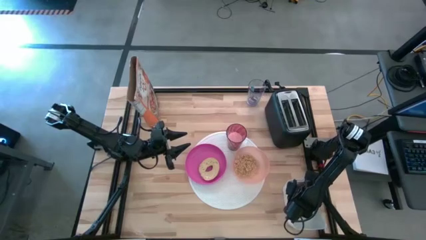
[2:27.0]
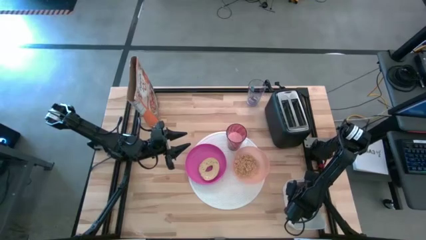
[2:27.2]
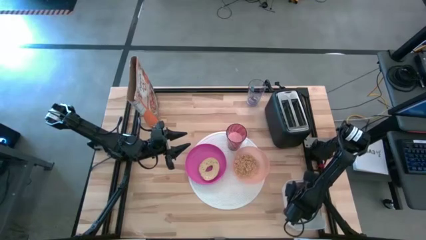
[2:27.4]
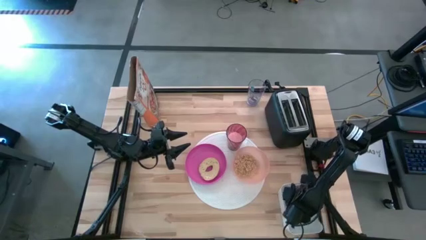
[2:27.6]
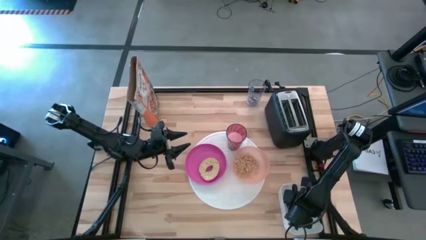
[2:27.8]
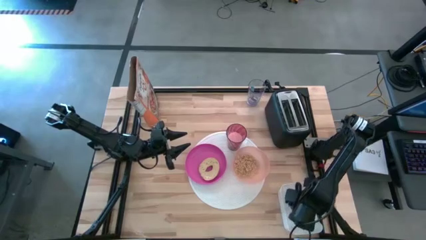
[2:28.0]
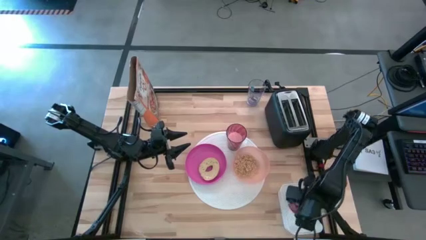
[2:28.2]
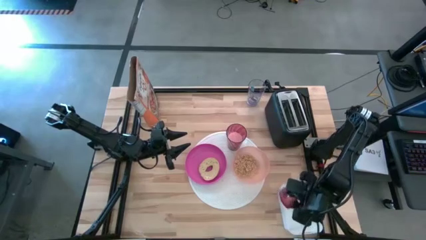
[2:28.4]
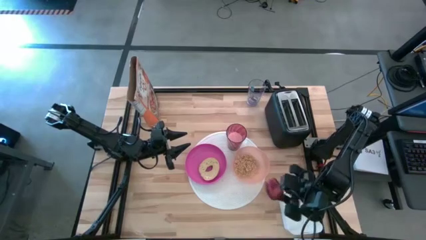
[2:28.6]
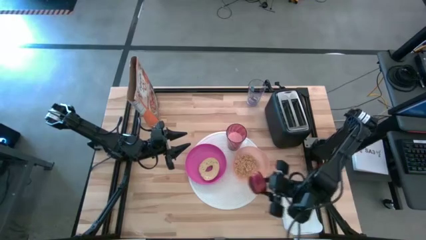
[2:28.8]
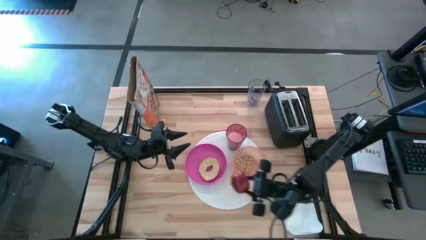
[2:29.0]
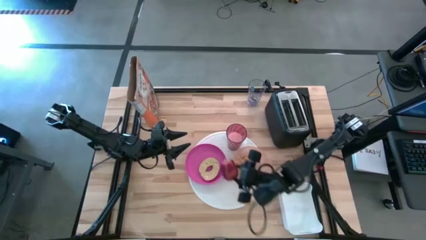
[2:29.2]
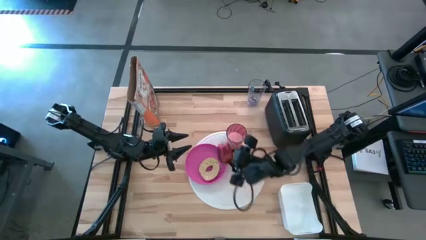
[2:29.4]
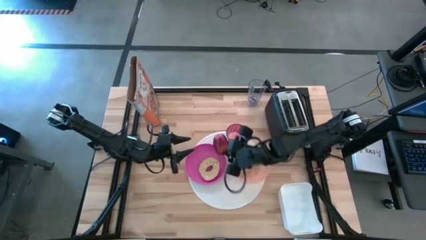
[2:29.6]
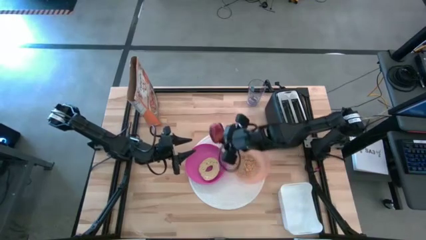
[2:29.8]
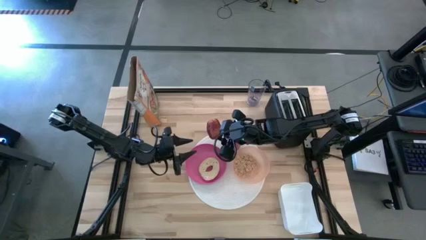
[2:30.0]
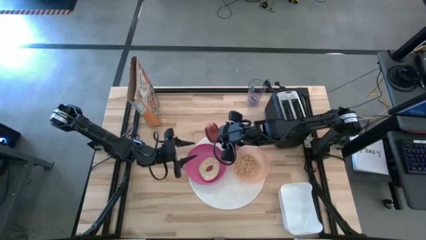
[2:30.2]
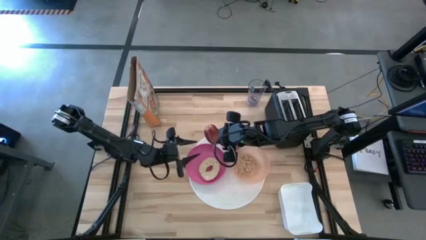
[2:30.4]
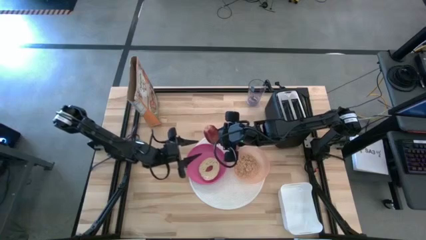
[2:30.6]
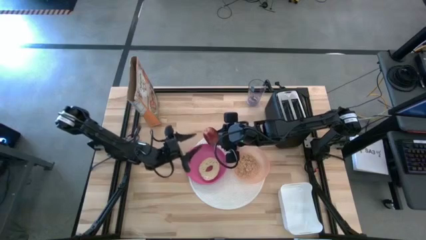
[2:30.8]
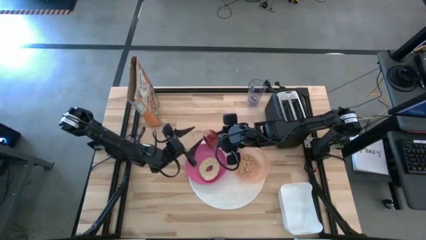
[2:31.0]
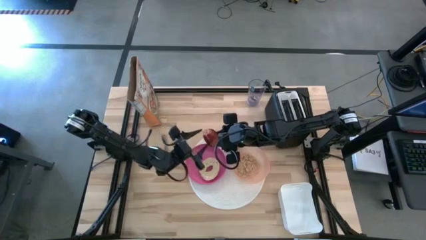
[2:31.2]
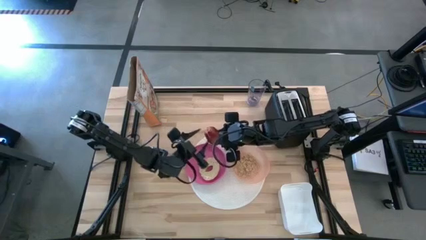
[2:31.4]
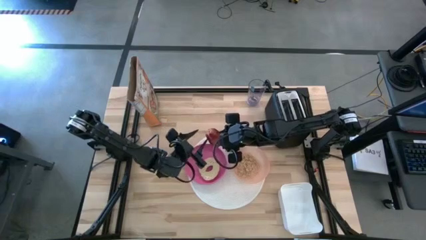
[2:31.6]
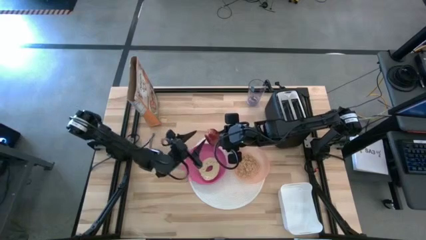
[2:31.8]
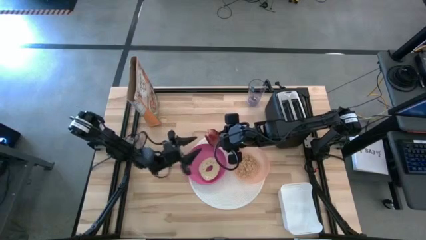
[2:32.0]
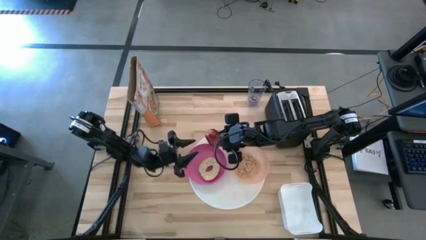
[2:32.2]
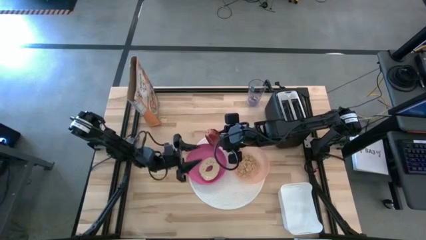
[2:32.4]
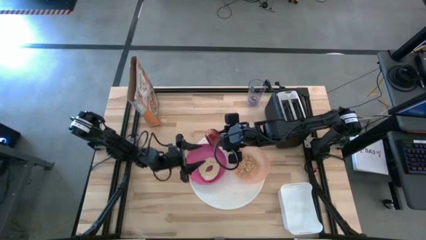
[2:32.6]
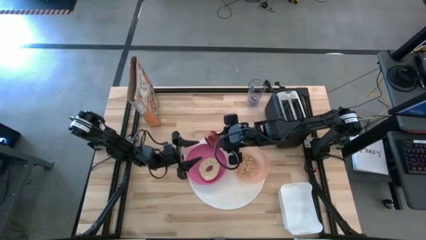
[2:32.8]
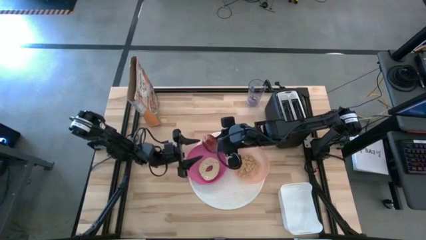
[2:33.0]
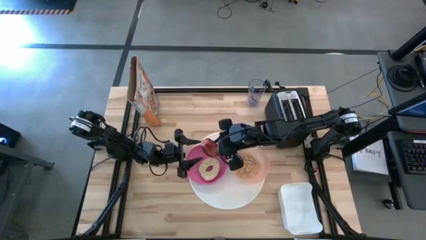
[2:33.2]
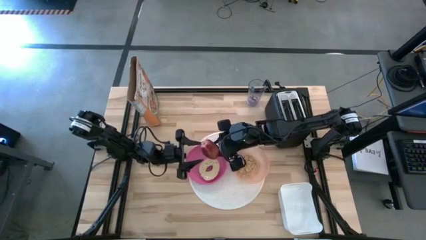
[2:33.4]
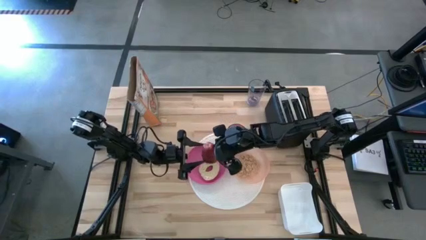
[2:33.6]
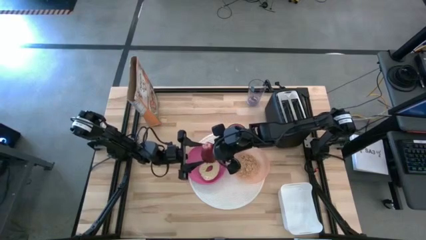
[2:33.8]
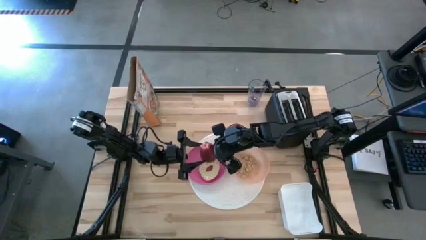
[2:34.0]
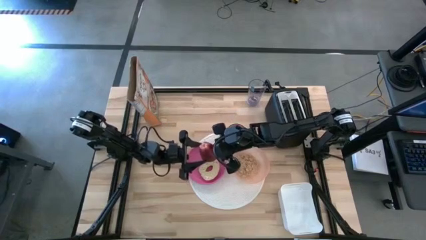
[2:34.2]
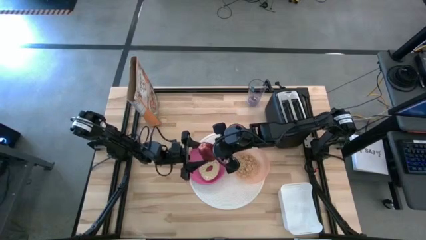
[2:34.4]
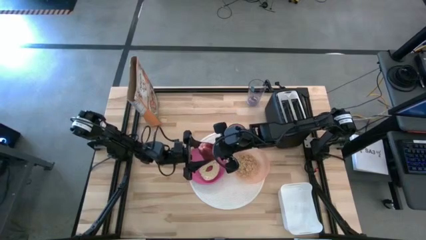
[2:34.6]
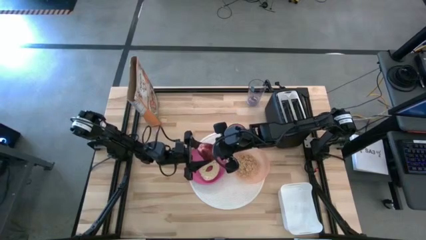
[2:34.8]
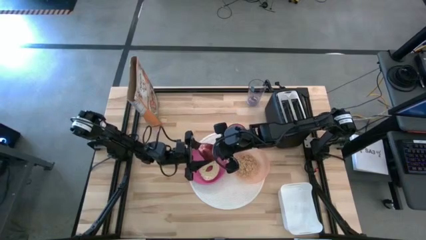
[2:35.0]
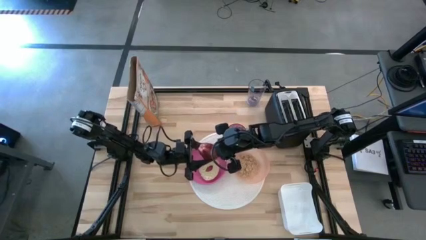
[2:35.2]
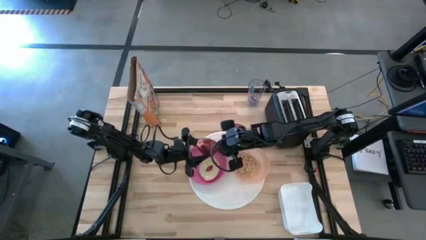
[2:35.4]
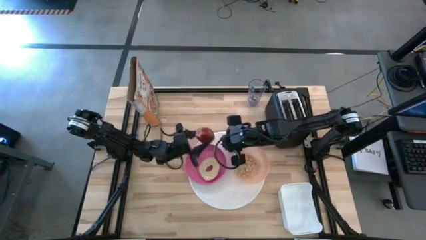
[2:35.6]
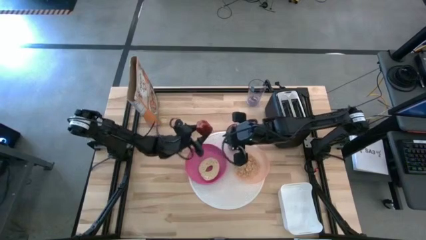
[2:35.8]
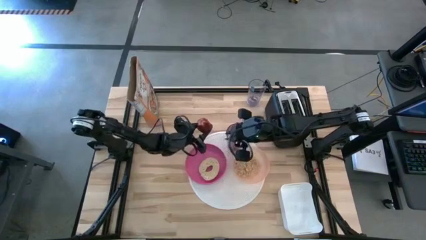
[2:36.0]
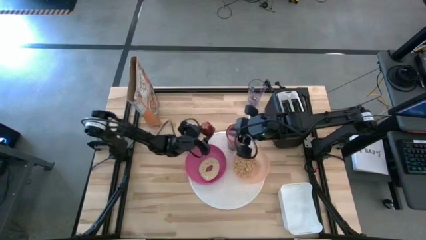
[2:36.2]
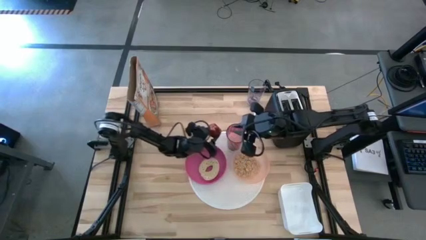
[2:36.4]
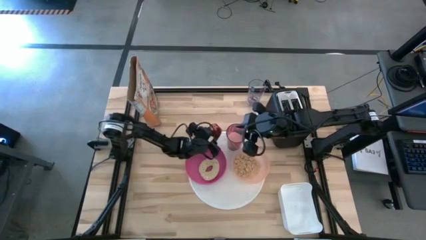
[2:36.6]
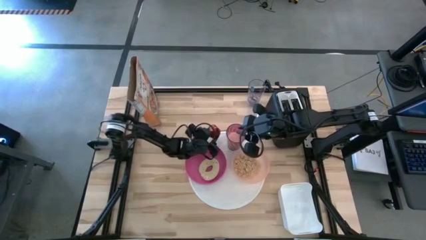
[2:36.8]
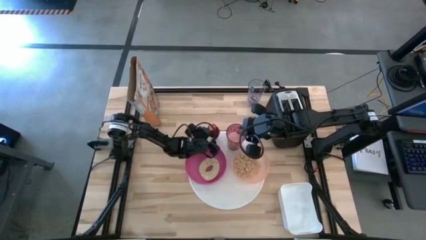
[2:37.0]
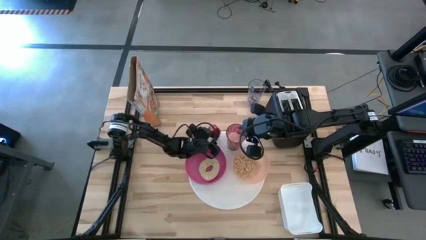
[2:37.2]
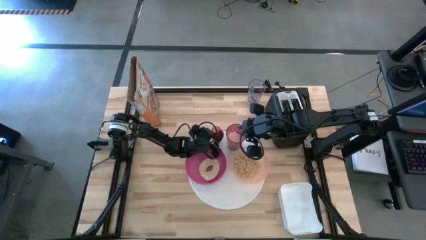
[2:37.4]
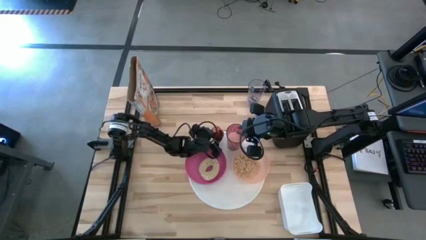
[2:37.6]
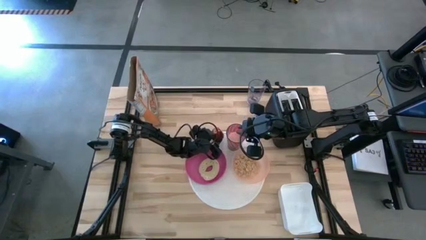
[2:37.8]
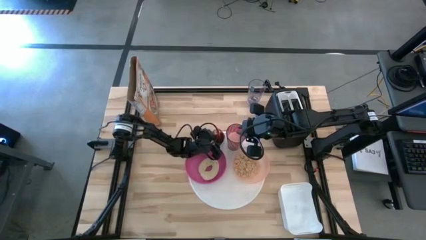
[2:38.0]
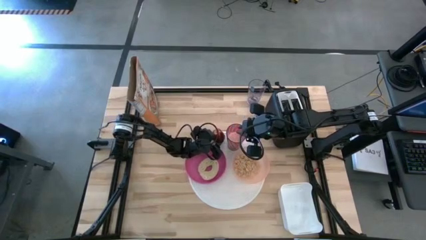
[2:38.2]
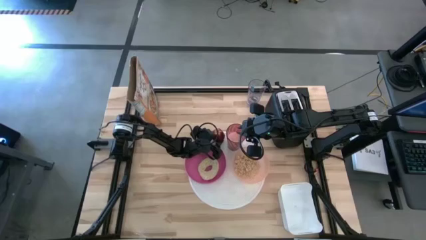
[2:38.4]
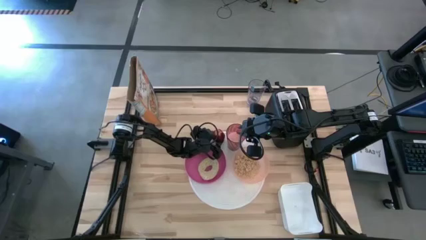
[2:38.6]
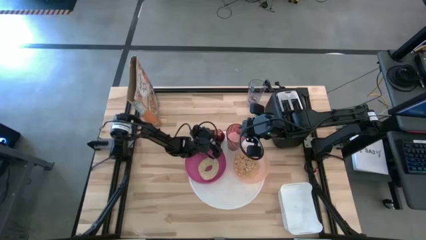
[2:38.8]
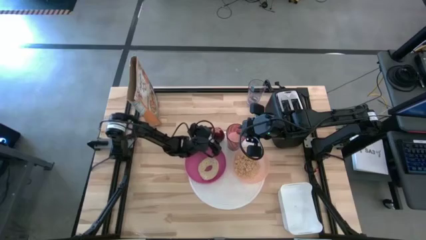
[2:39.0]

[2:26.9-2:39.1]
Task: Arrange a breakfast setting
Put the apple from the white bin on the white placemat beside the red cup
